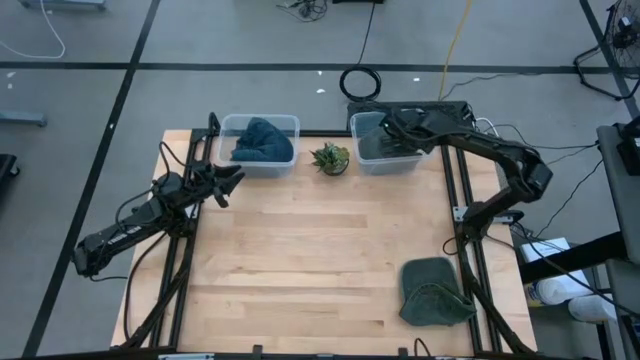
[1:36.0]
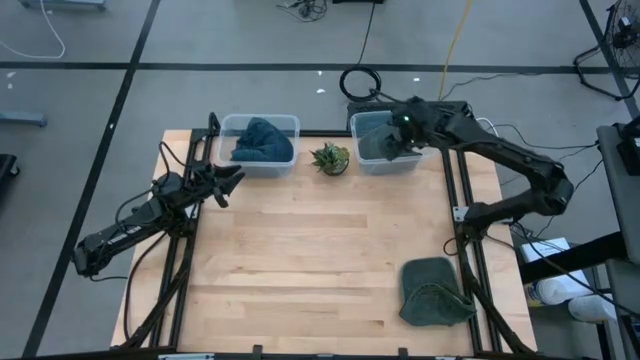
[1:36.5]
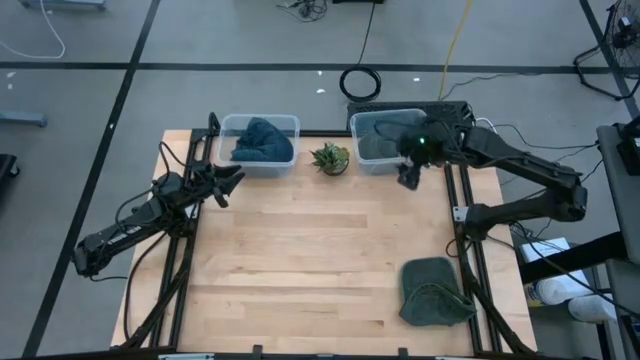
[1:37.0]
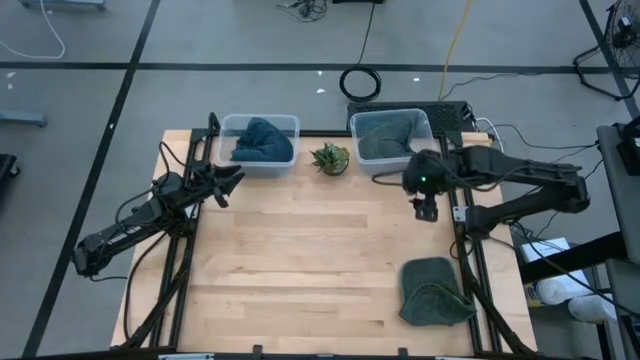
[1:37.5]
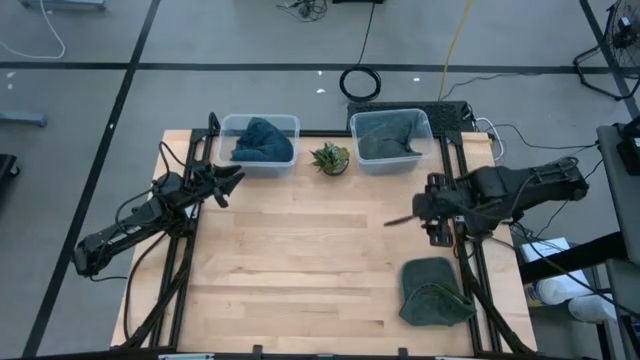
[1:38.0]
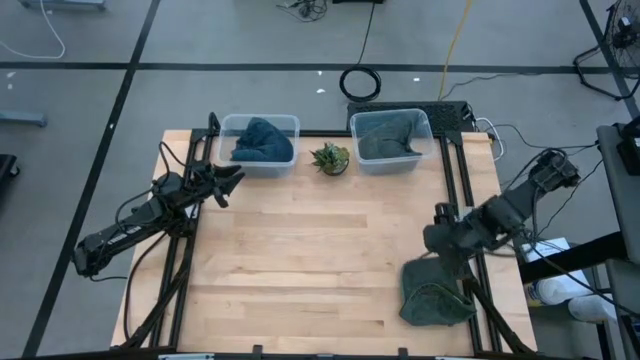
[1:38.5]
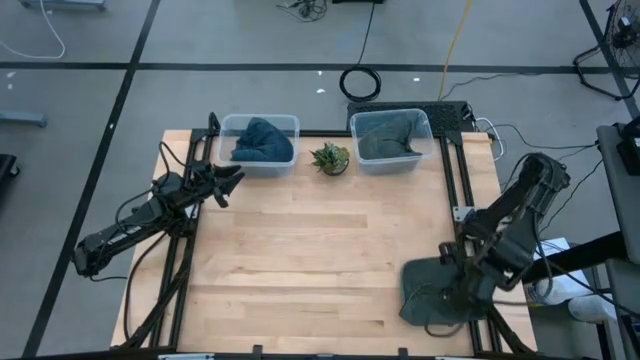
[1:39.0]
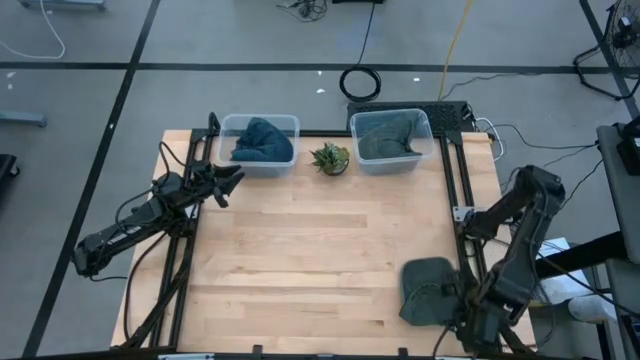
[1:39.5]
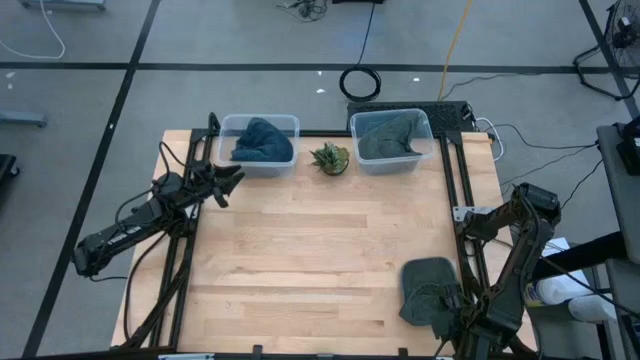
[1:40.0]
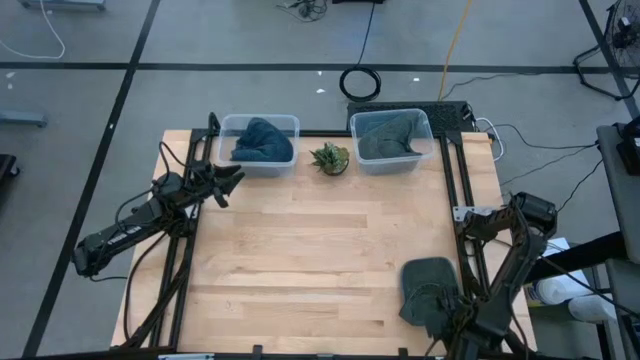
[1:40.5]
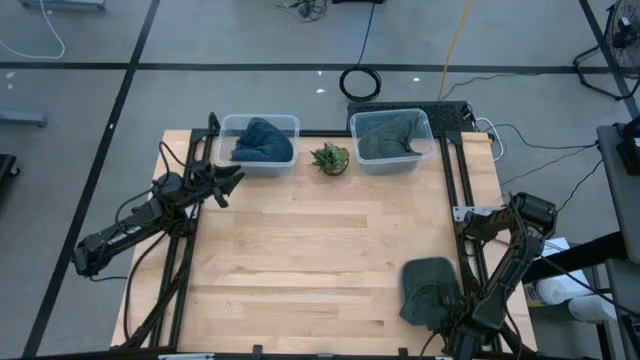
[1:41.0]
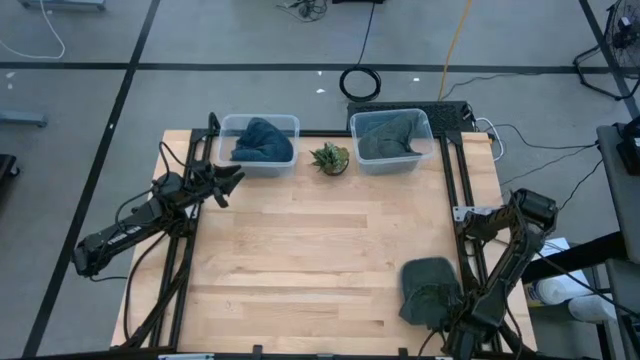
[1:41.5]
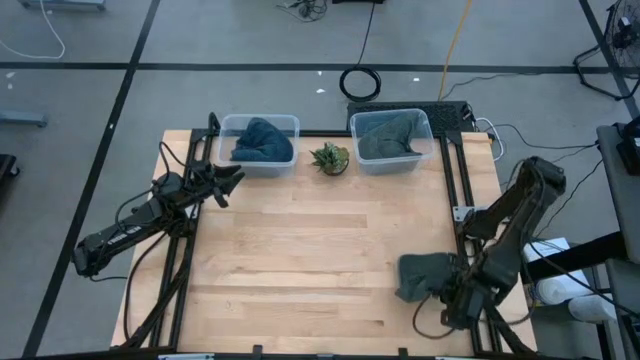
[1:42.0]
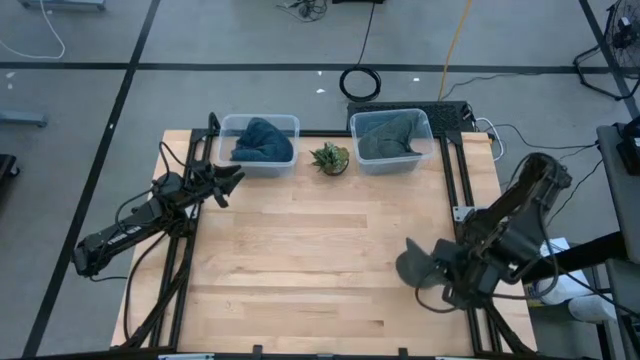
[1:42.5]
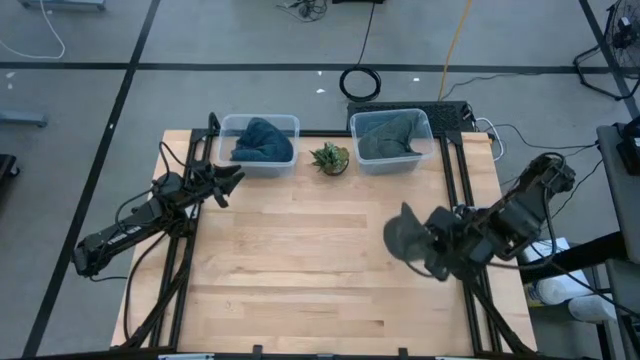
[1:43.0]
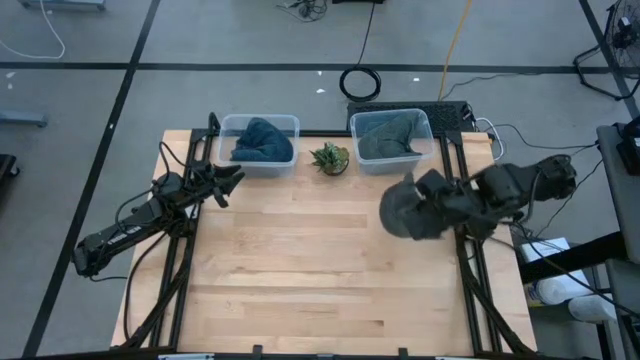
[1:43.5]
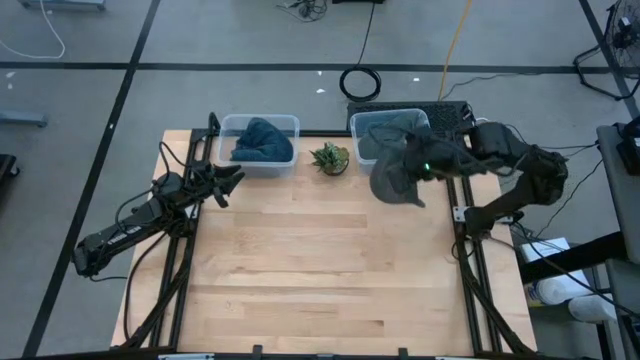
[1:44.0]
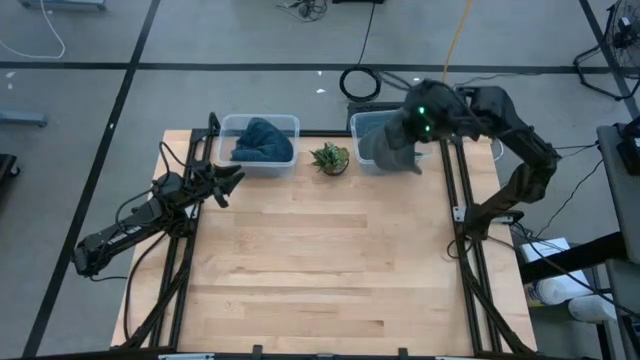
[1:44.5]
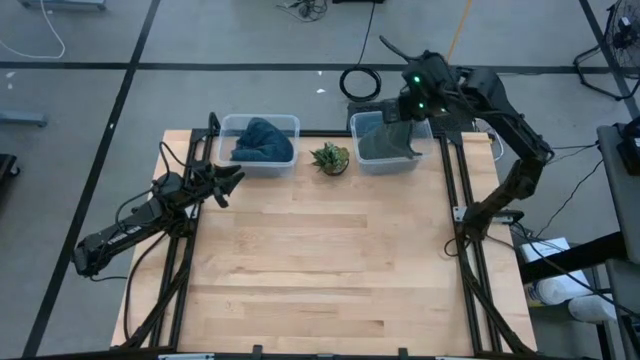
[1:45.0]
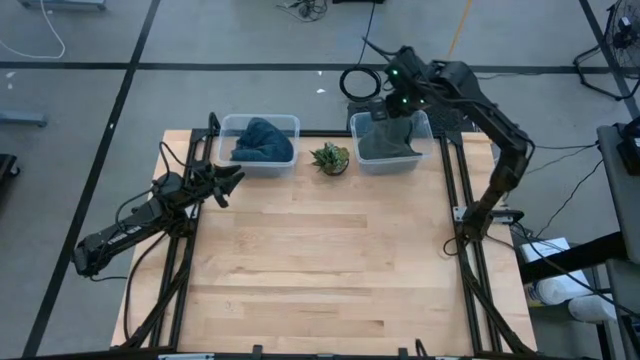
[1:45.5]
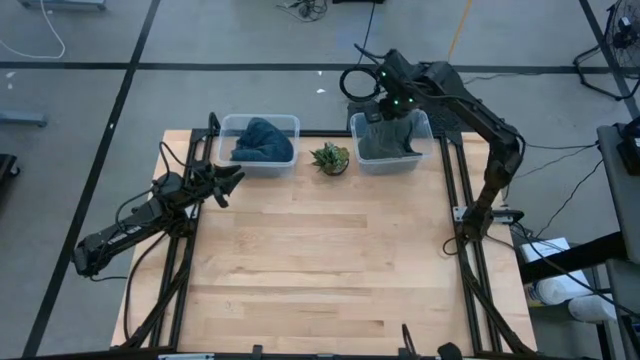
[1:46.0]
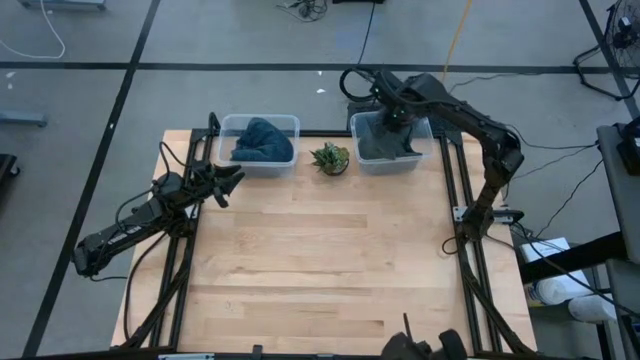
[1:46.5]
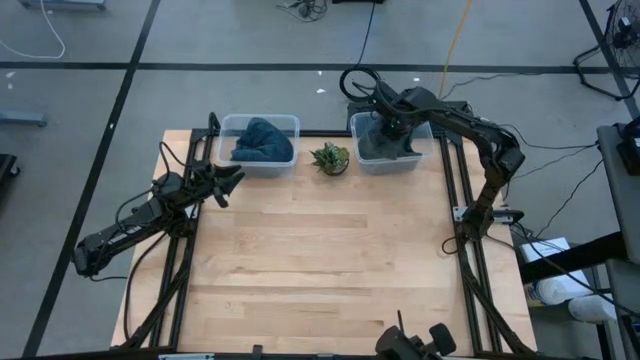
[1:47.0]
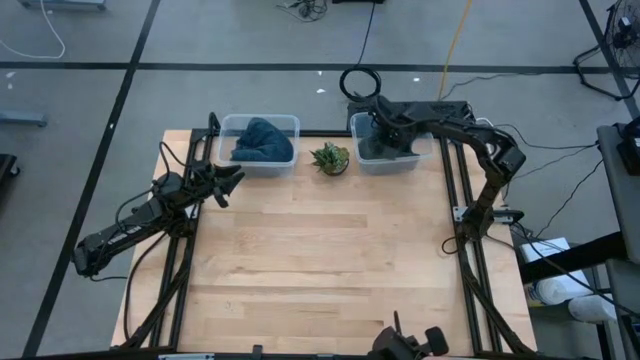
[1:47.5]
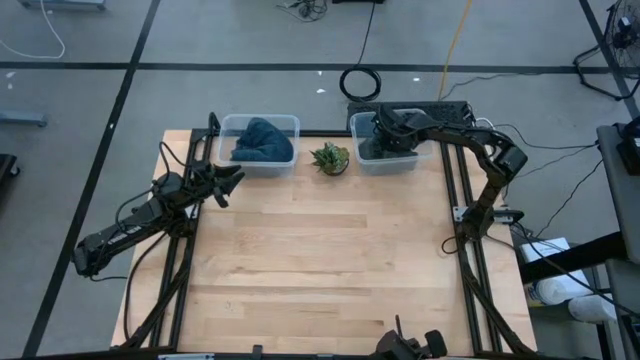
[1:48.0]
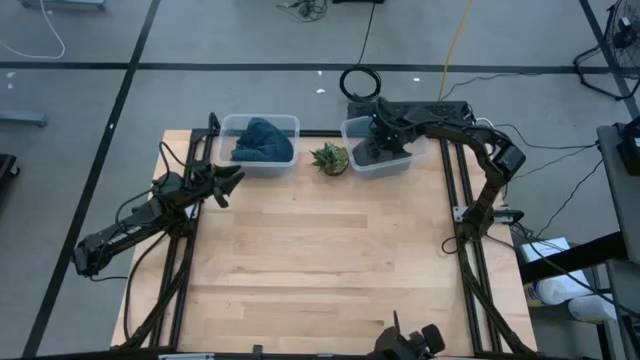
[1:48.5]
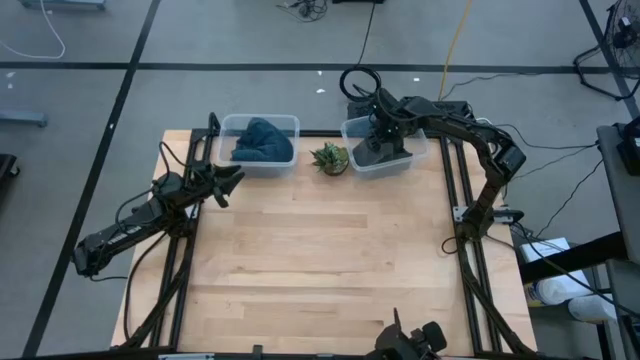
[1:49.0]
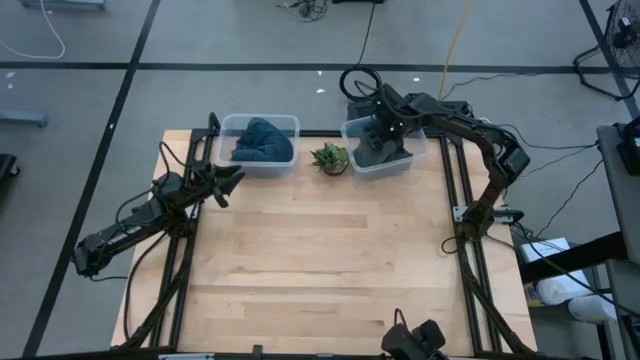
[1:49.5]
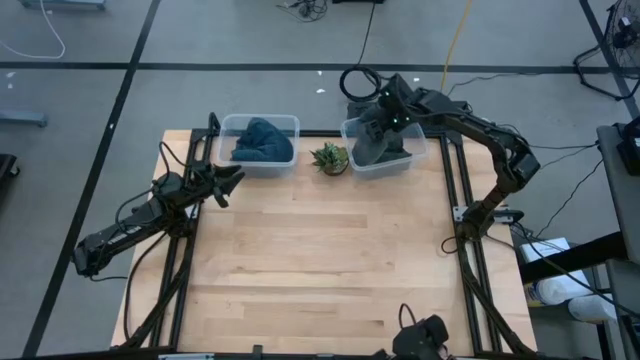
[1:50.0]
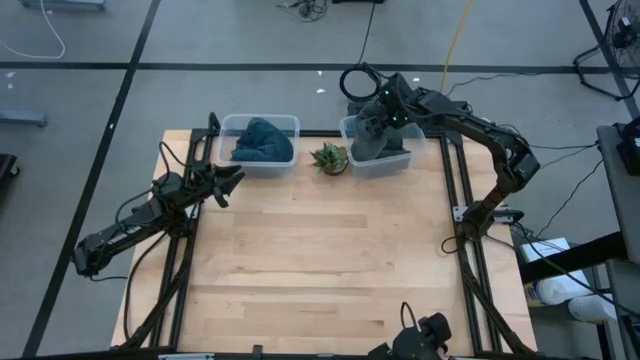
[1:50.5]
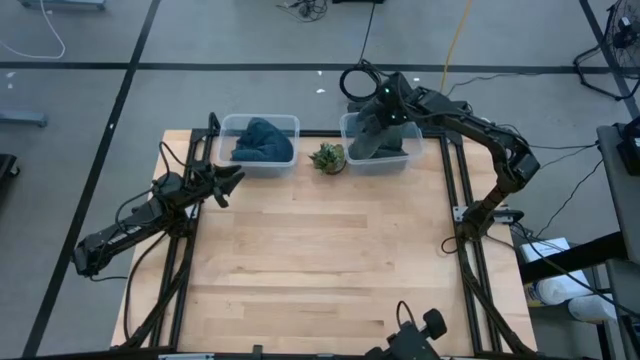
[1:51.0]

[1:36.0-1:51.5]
Task: Pick & Place hat
Put the green cap into the right transparent bin

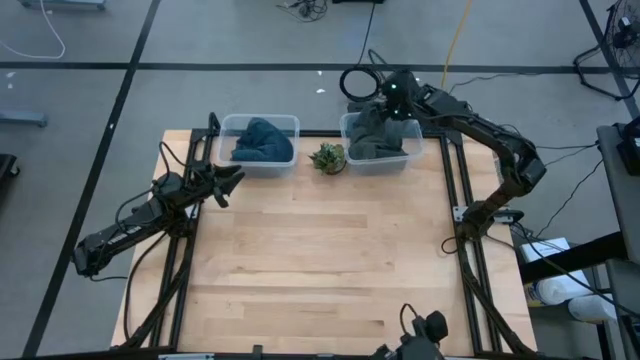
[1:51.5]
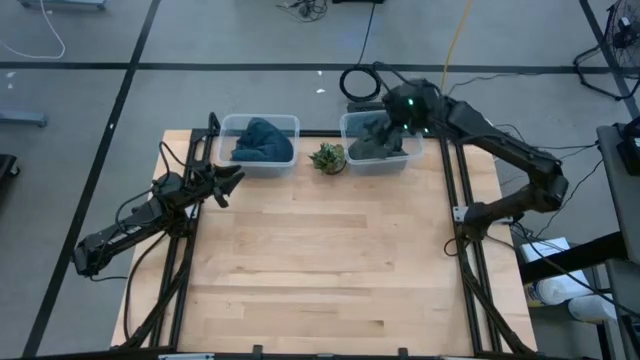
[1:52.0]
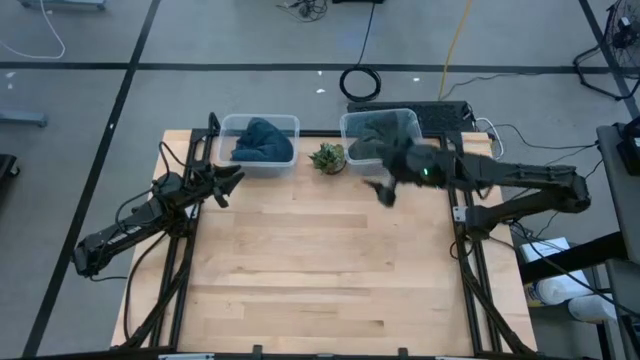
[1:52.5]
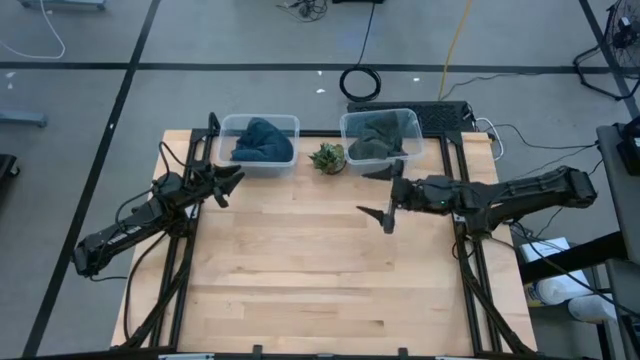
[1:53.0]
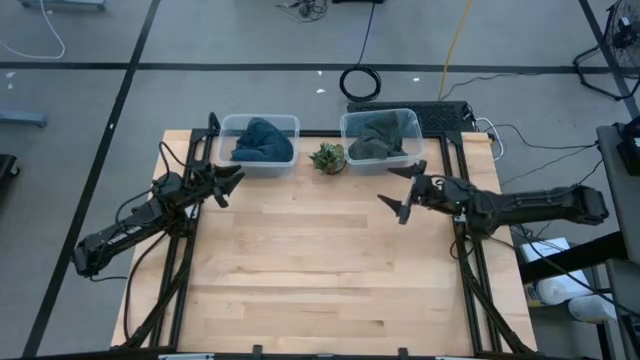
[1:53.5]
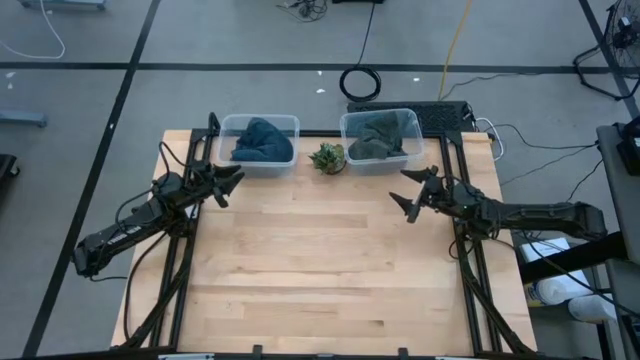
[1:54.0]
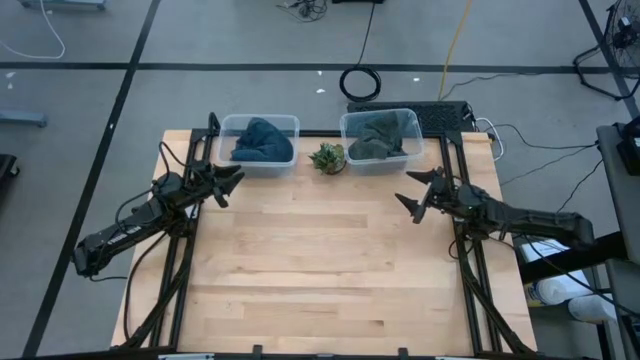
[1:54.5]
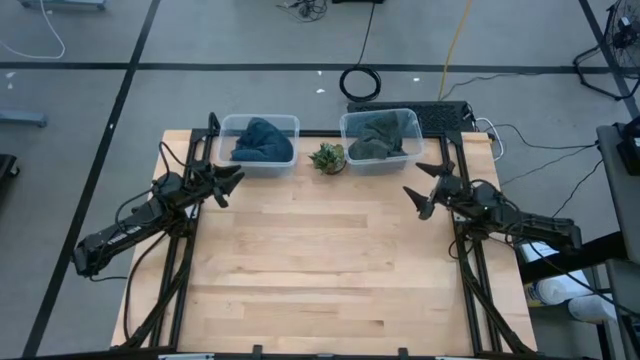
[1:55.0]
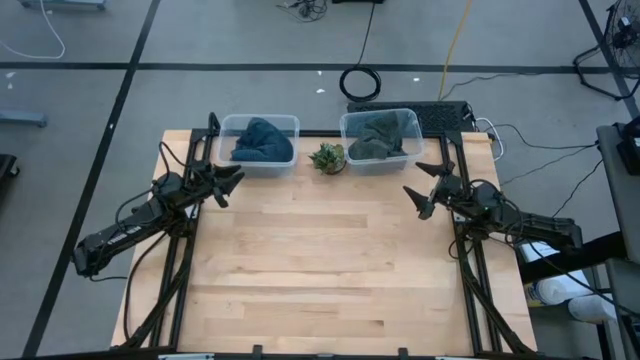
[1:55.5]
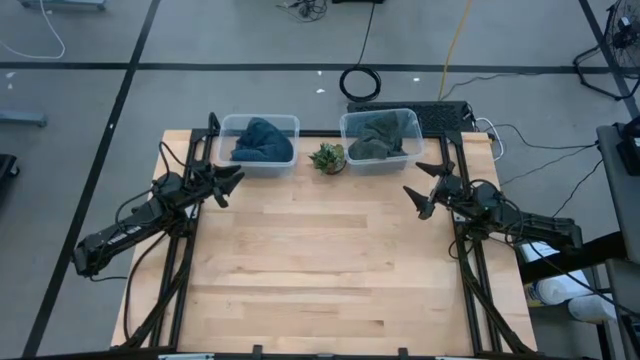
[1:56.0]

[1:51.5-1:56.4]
Return to Home Position

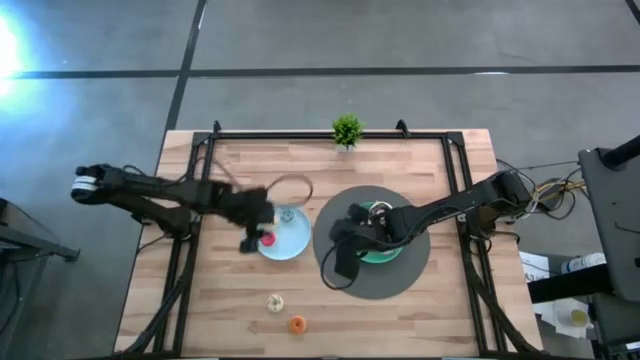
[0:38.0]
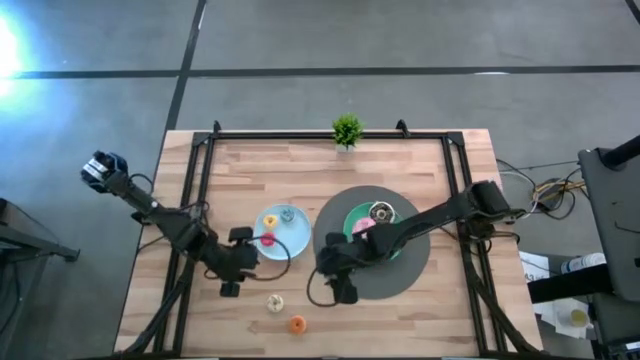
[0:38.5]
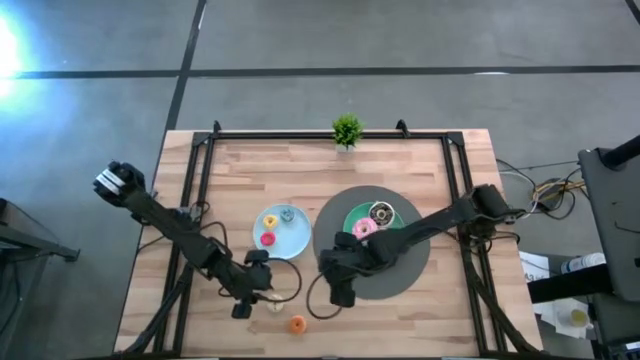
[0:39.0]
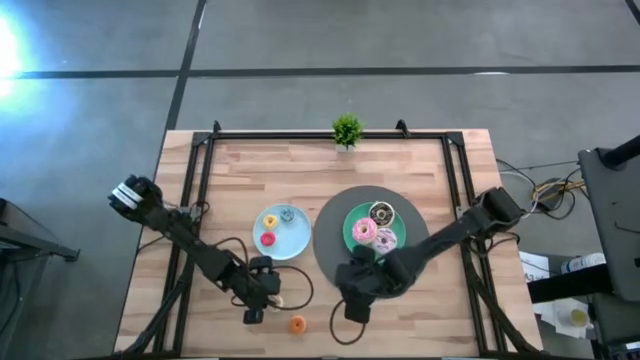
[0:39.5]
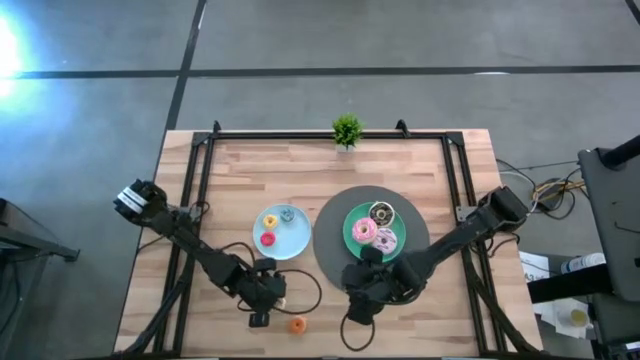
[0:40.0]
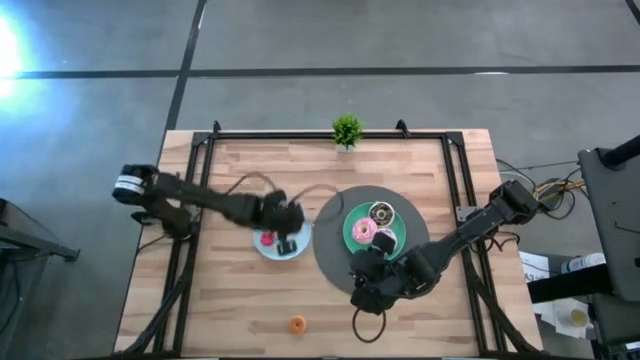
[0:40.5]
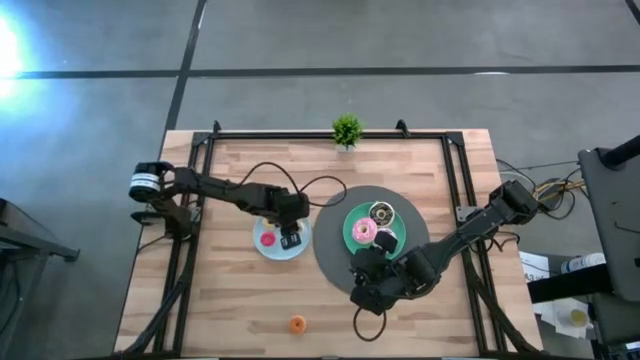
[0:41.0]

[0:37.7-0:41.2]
Task: Pick & Place donuts
Put the small white donut on the blue plate
